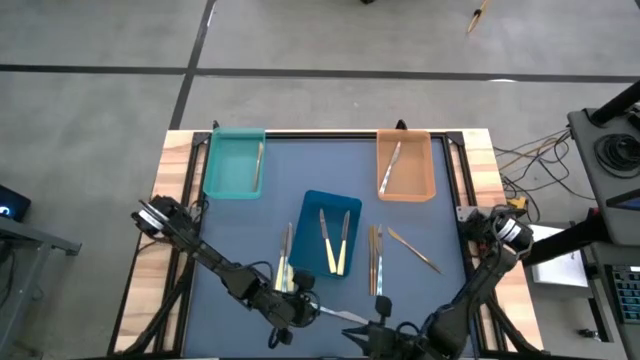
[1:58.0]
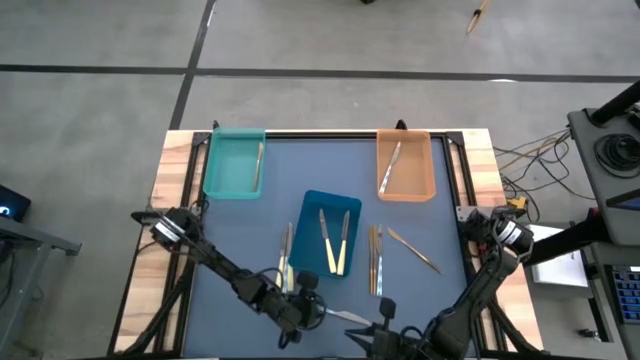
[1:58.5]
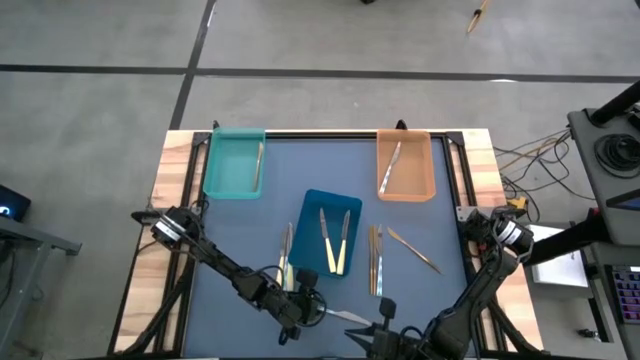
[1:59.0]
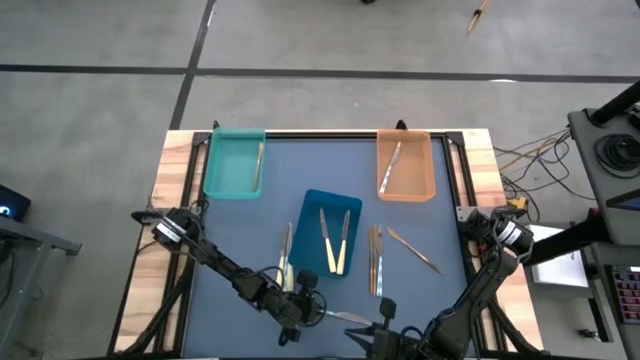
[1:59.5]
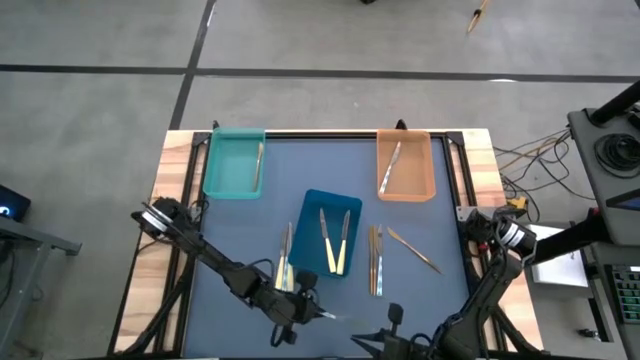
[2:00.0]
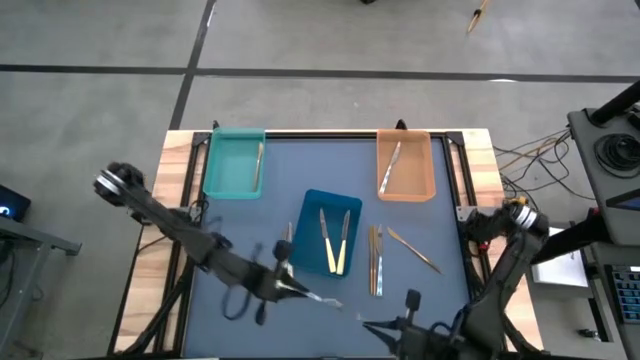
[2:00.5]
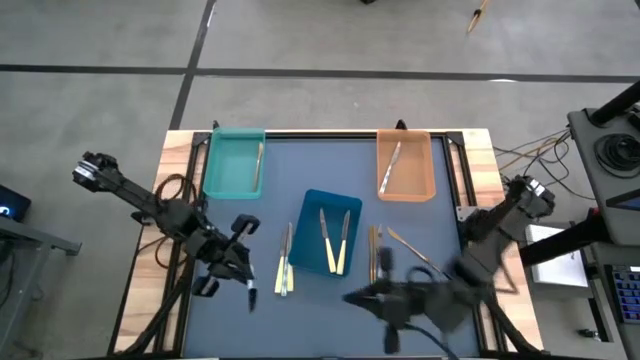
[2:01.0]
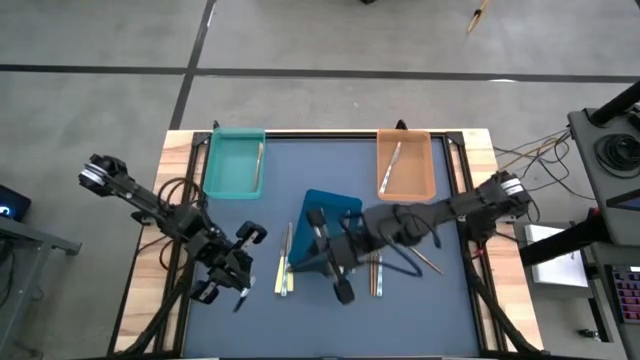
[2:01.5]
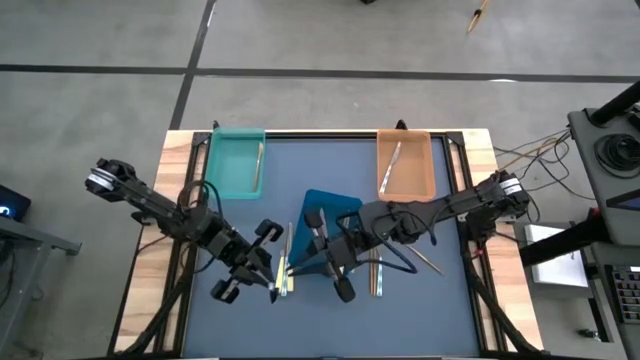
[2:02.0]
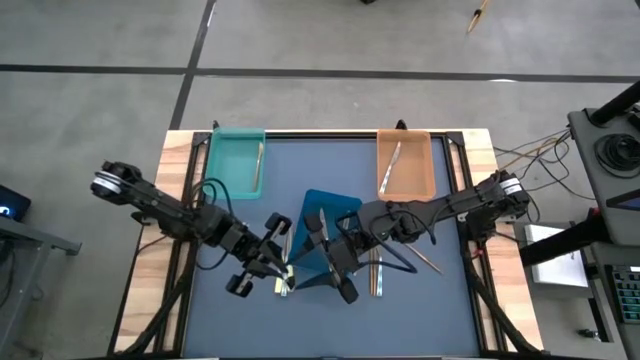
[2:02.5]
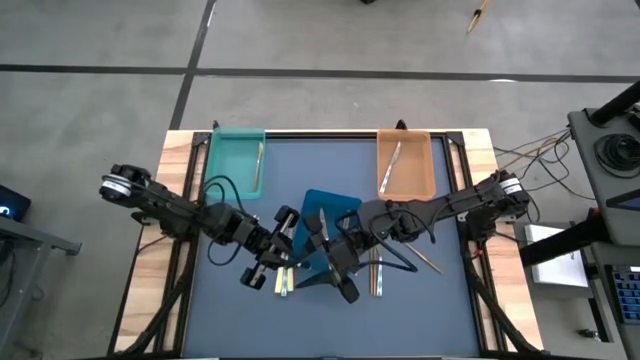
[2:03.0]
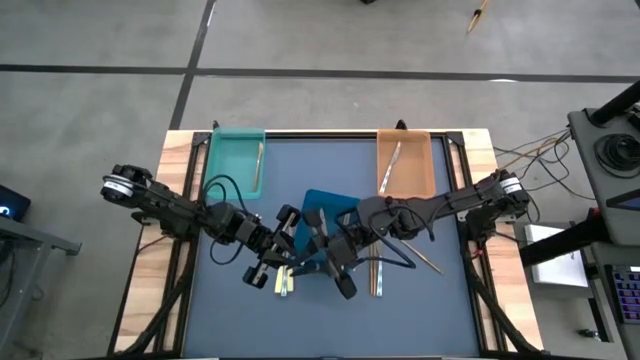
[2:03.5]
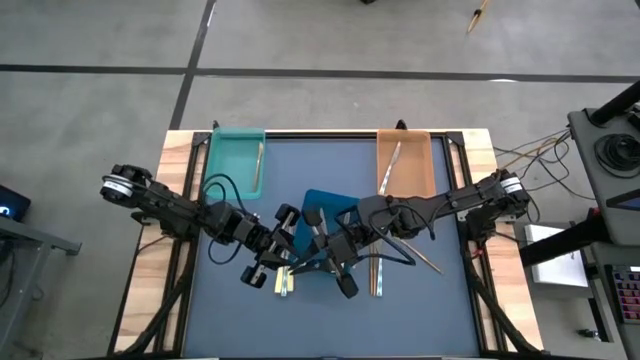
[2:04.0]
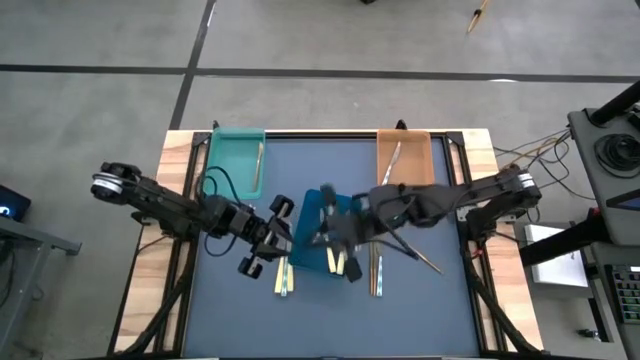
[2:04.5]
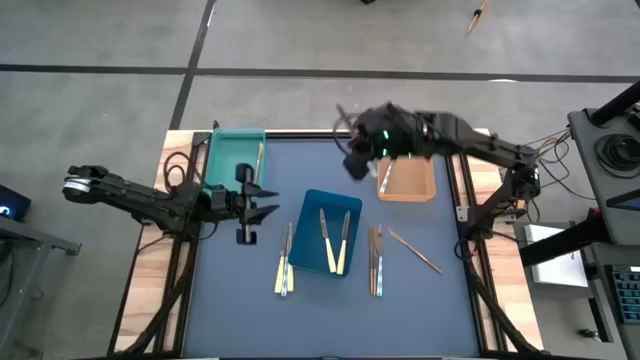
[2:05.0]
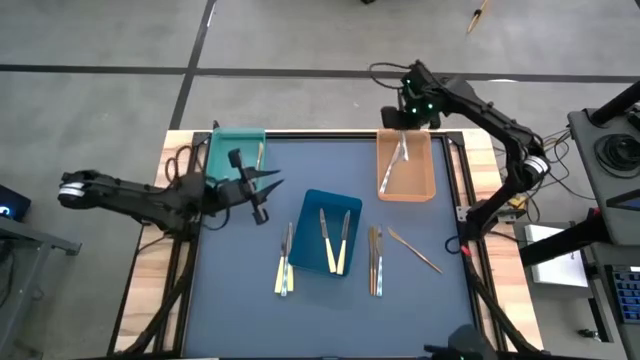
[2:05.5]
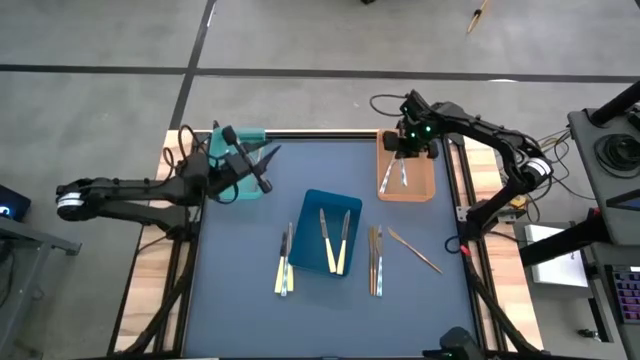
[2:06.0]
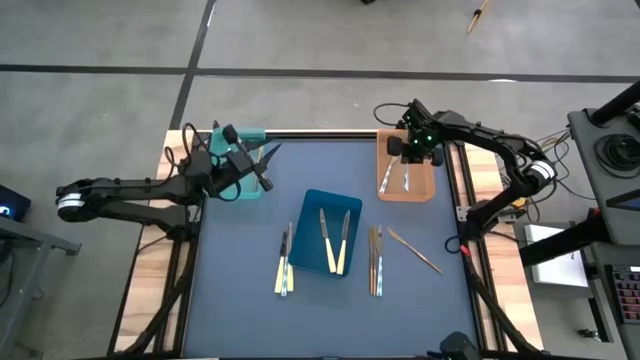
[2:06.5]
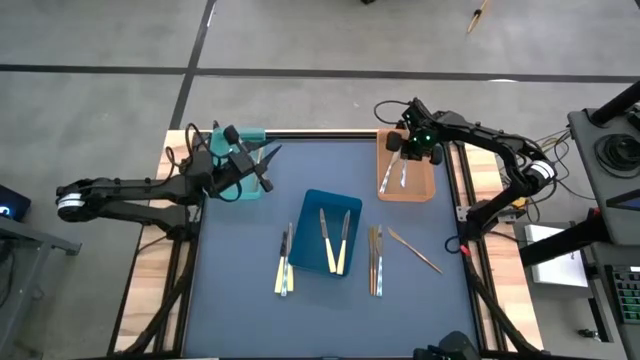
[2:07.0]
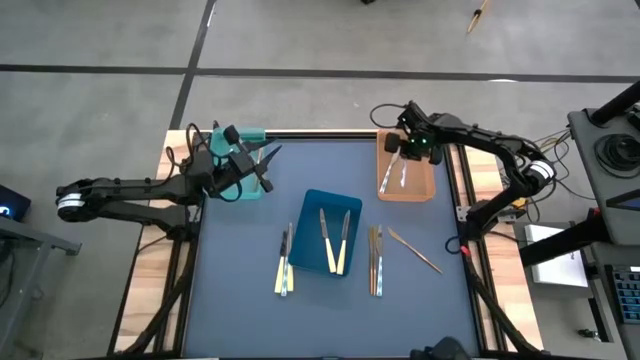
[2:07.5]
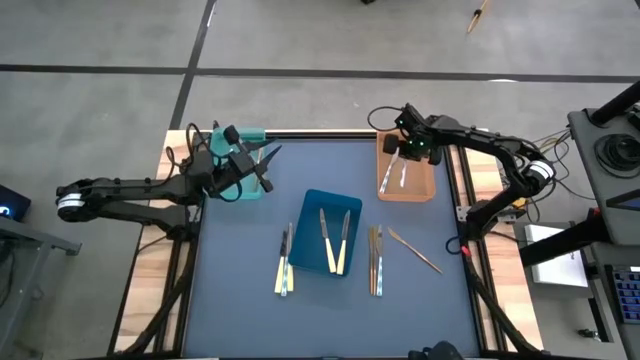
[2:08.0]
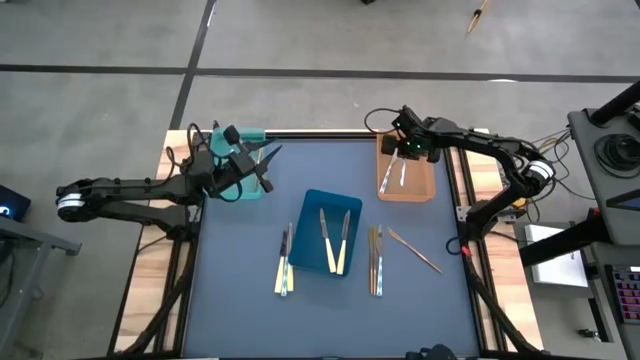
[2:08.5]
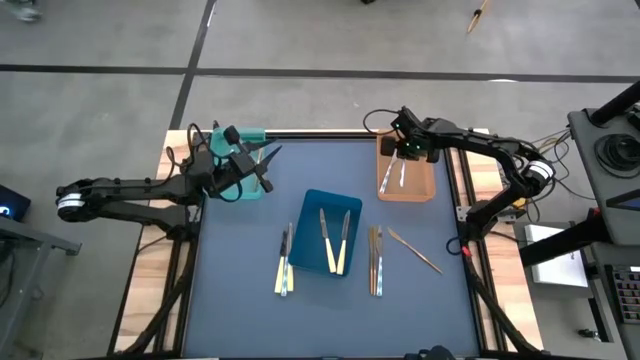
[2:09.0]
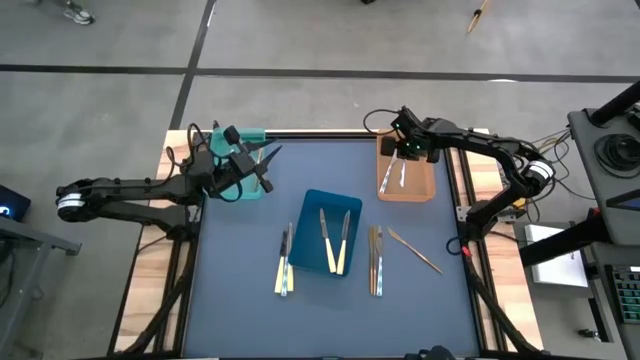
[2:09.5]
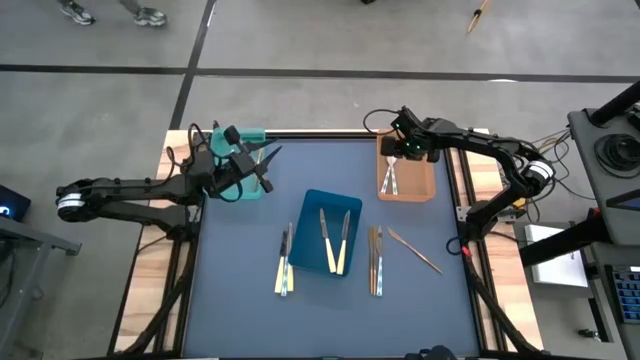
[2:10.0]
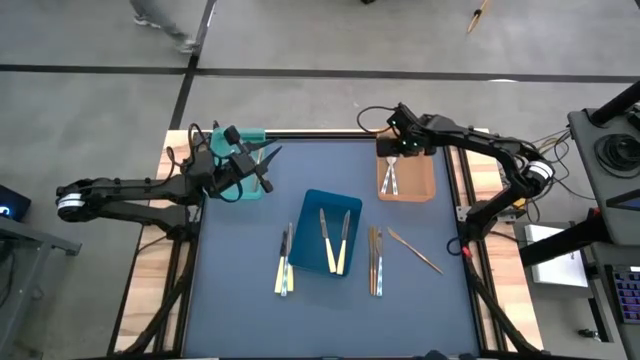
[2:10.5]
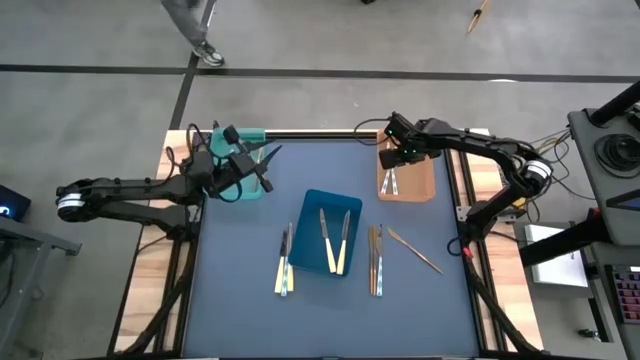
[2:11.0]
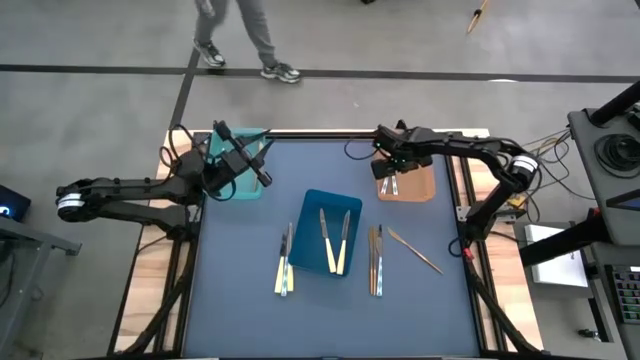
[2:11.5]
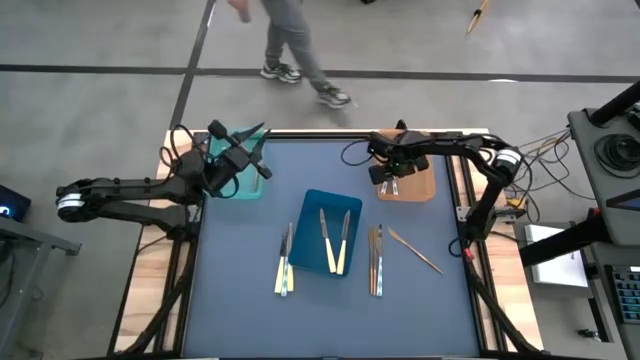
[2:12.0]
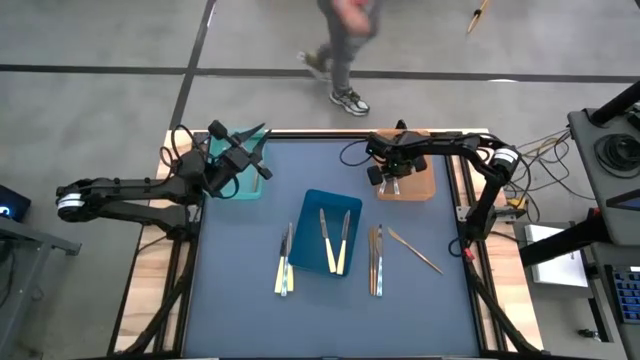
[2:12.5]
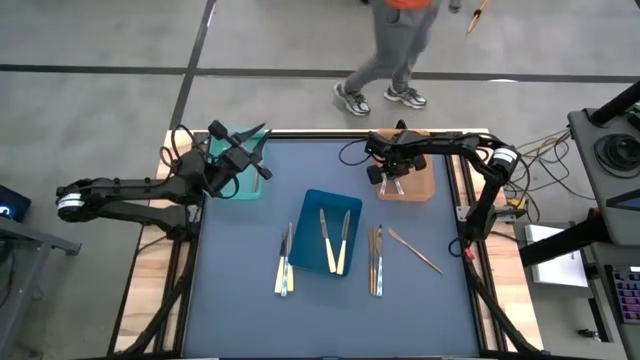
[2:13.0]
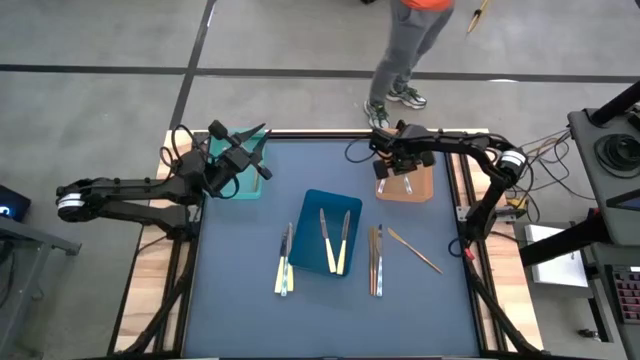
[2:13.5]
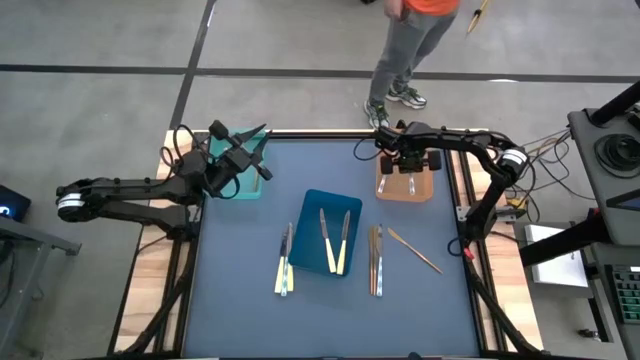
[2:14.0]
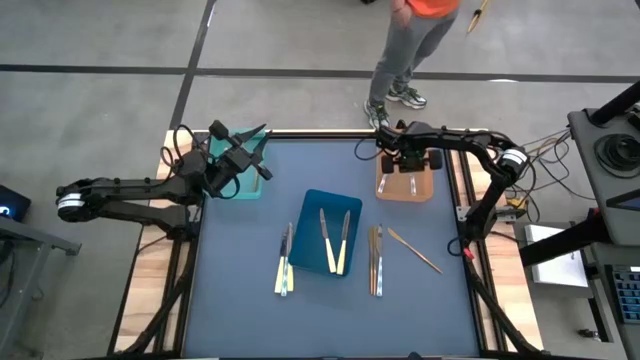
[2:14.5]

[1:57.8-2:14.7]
Task: Sort silverware by color (type)
Put the left blue and white knife into the orange bin

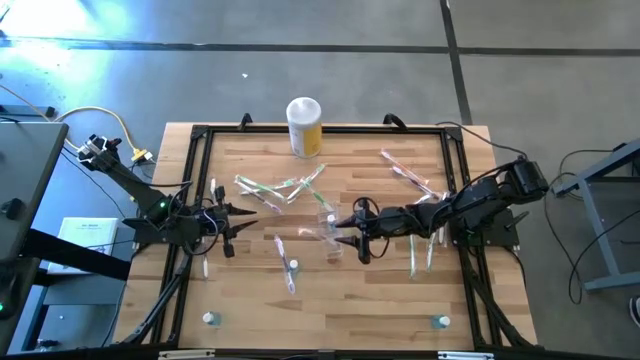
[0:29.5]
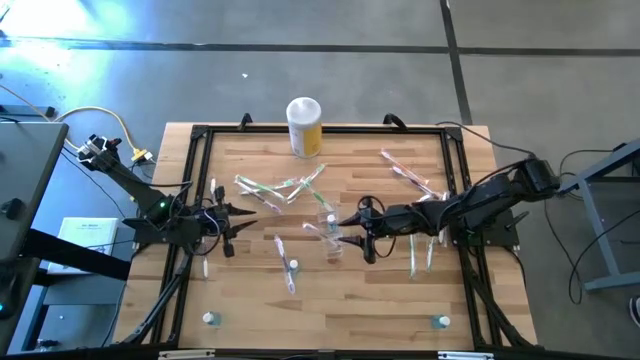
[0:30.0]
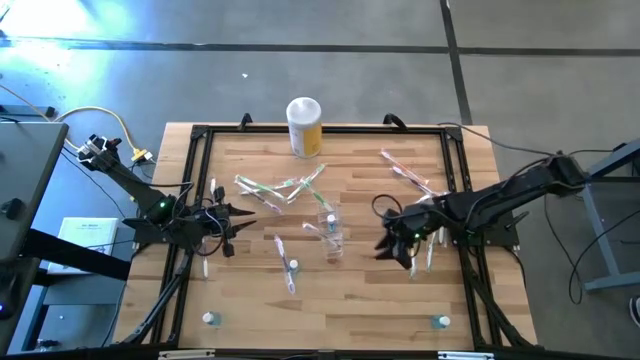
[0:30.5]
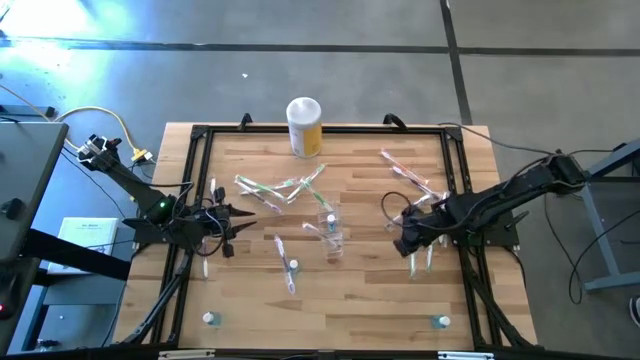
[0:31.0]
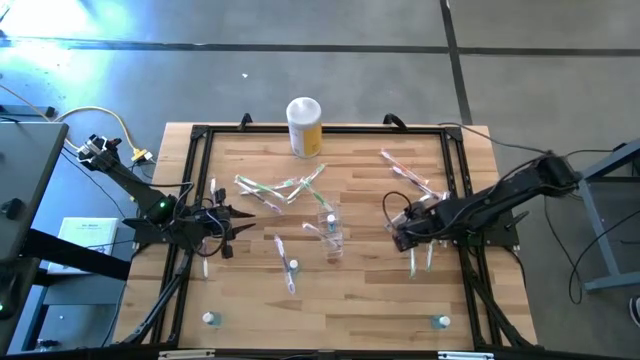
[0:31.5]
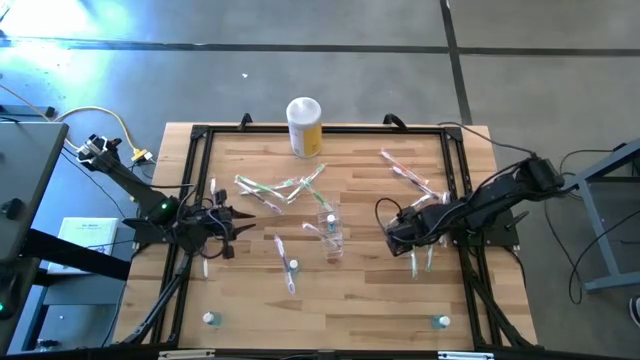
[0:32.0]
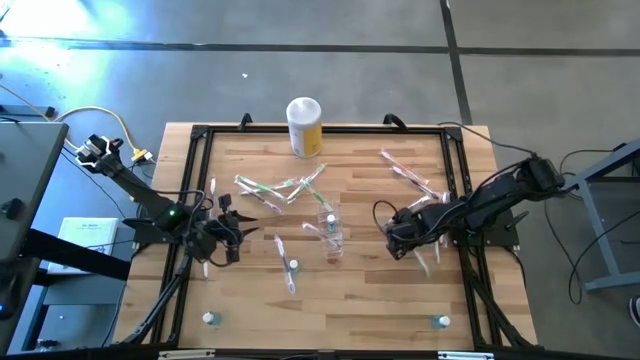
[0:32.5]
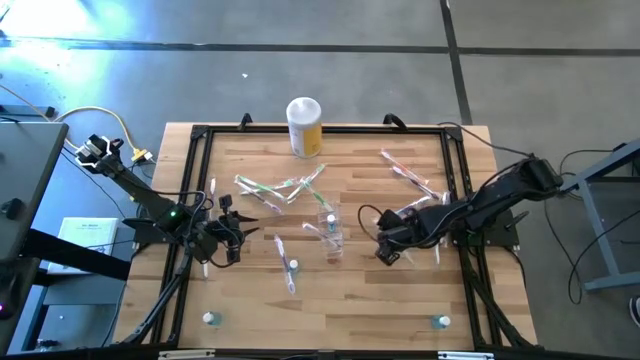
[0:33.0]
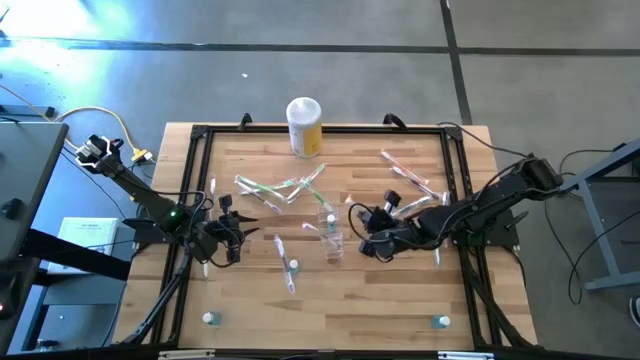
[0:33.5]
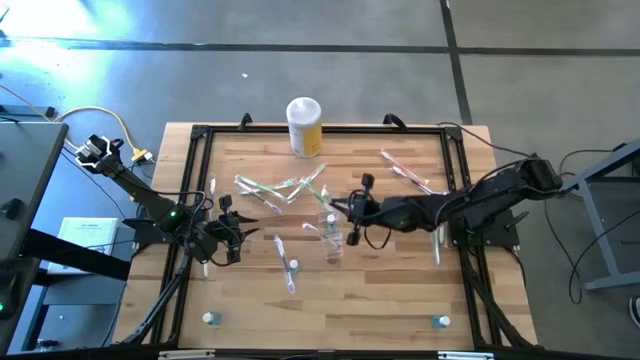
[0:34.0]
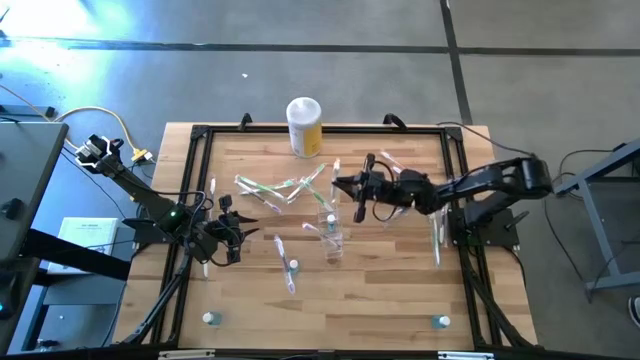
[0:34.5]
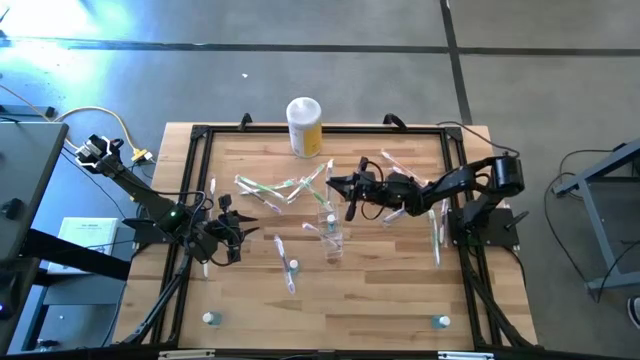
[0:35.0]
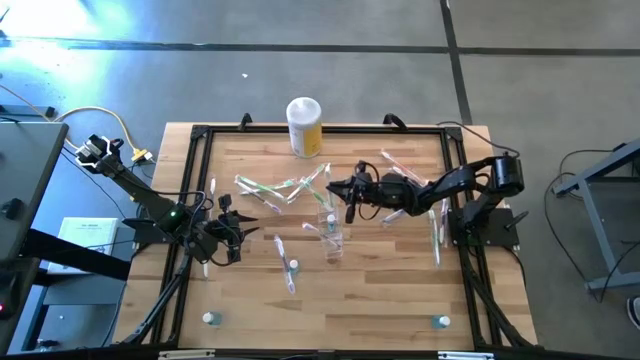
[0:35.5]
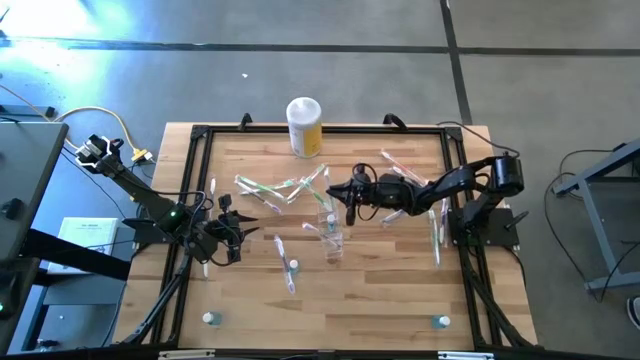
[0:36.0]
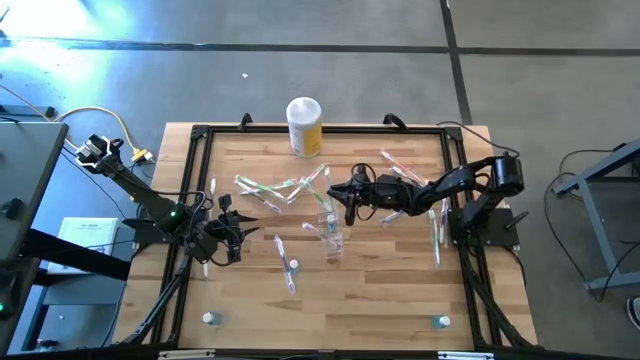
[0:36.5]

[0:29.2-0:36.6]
Task: Pick & Place toothbrushing station
Put the green toothbrush into the transparent organizer
